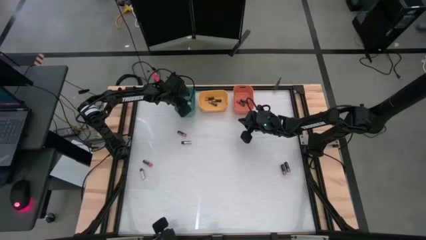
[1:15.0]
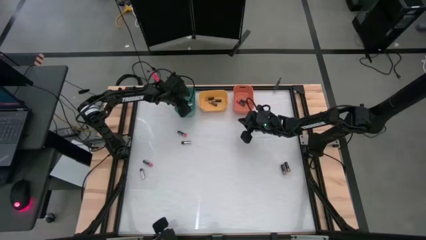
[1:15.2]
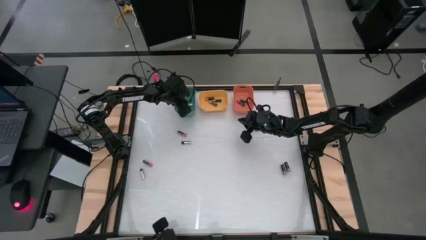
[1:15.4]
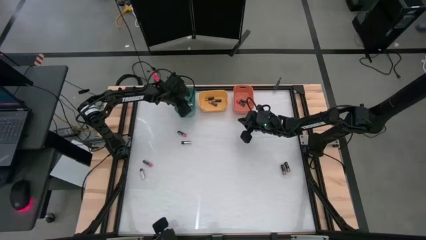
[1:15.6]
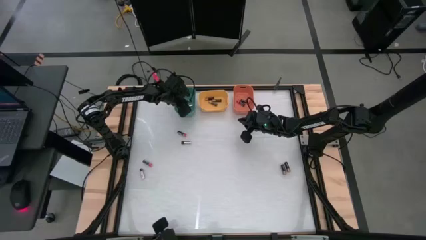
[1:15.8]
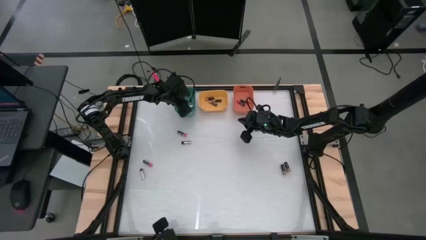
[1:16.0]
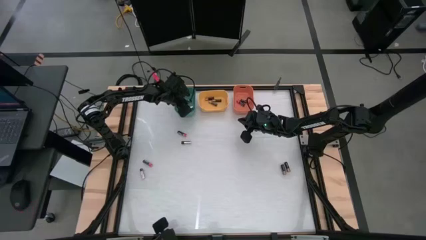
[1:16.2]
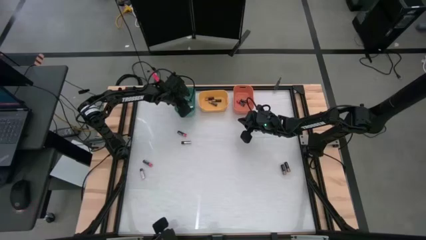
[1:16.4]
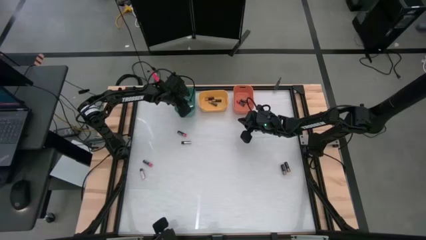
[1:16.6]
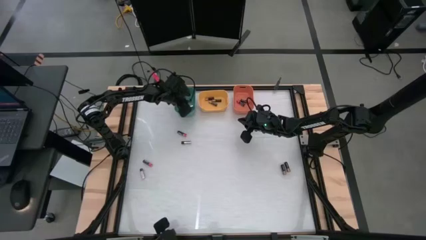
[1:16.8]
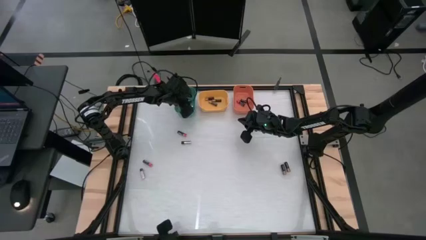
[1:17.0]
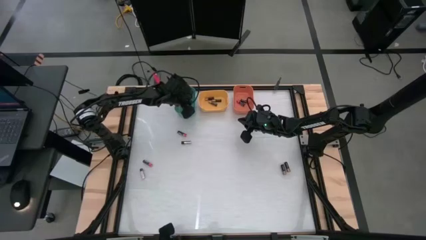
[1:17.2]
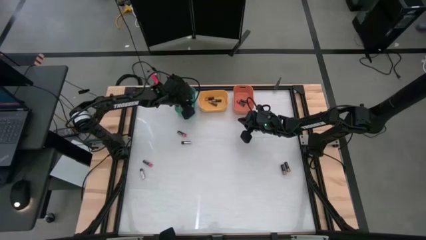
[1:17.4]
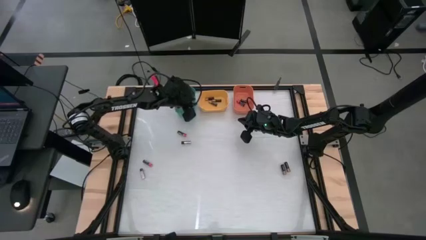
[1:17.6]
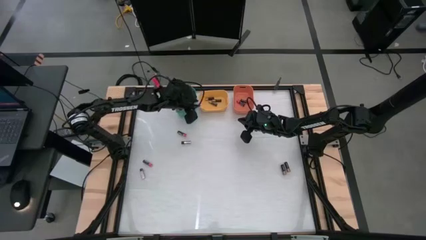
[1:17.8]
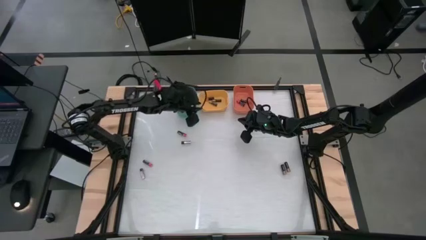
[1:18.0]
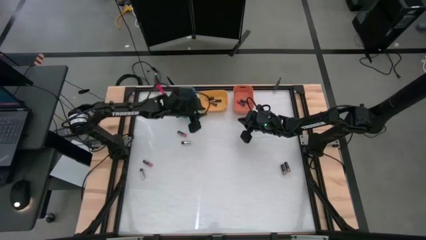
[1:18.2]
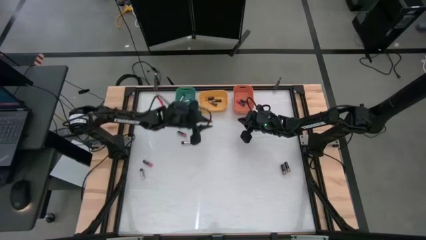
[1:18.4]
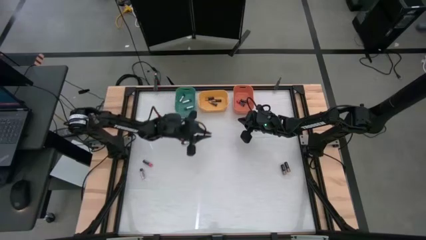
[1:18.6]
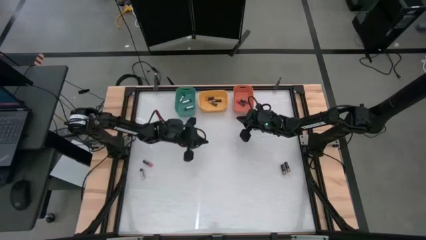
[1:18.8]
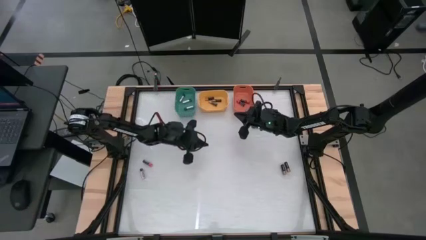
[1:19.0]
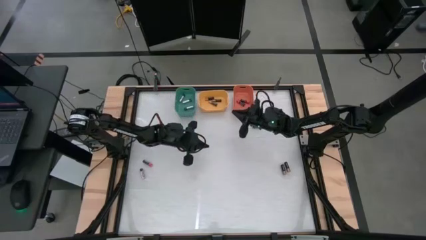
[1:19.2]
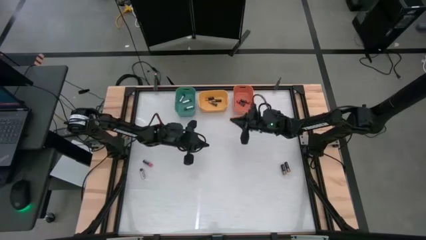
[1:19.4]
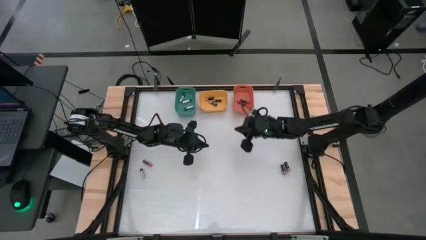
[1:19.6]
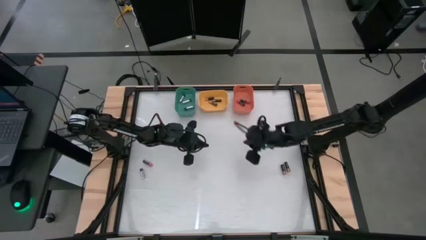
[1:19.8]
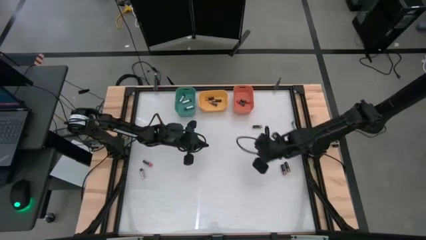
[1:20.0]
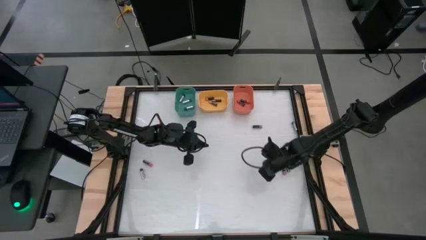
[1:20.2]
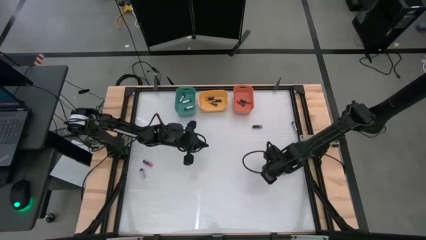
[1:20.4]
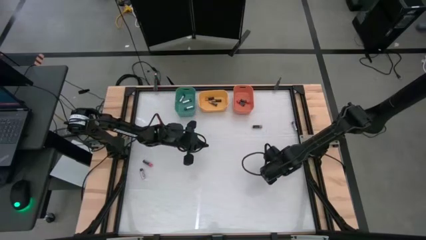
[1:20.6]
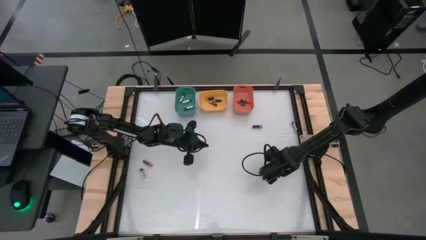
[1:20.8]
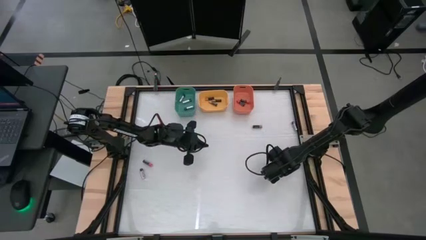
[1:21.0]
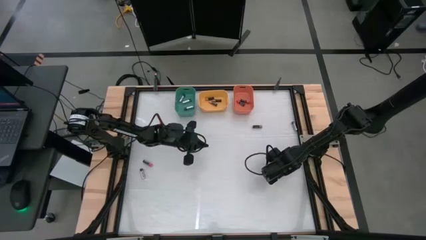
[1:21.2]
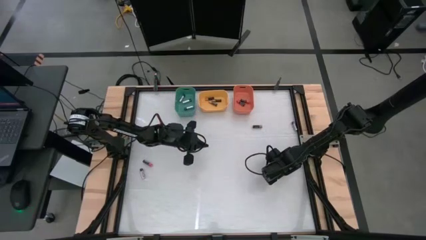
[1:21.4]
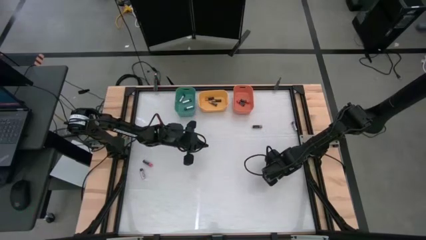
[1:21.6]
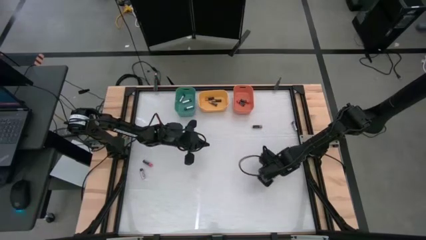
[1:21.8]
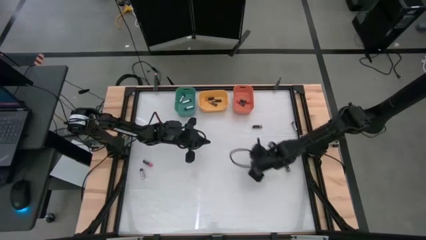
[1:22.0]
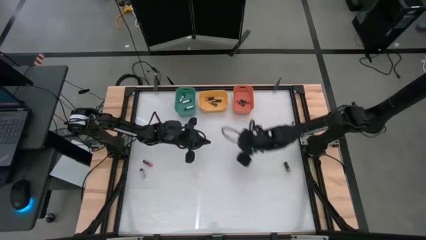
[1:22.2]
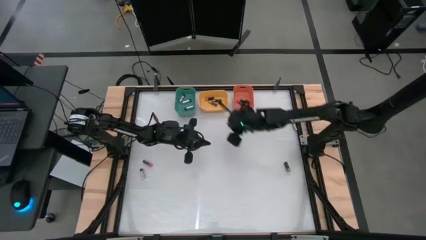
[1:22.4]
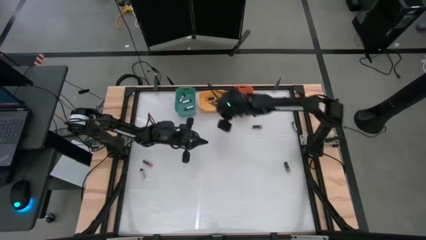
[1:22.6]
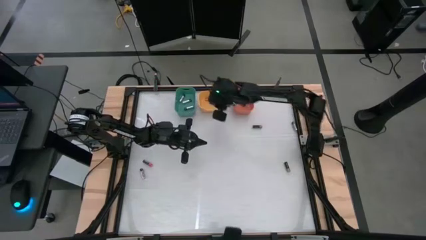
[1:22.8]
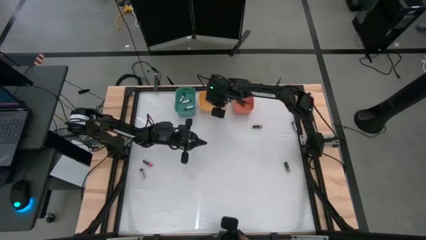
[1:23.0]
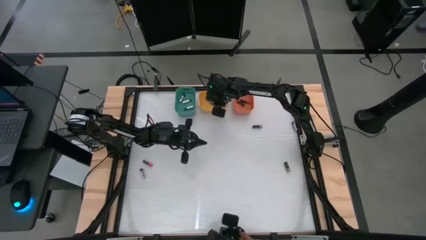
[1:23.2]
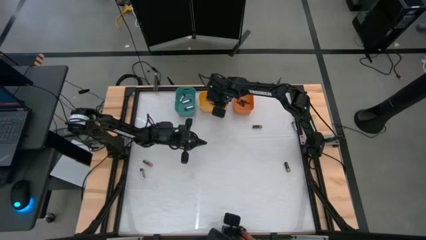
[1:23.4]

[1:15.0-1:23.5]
Task: Sort batteries
Put the brown battery into the yellow bin

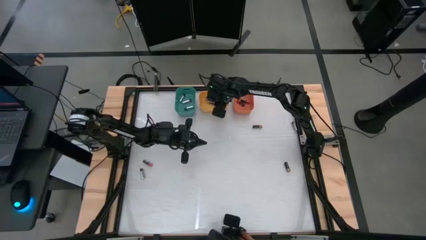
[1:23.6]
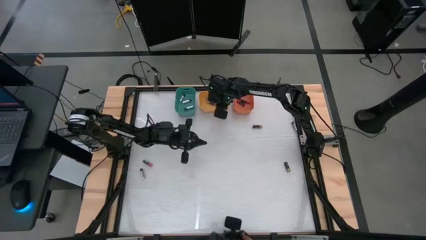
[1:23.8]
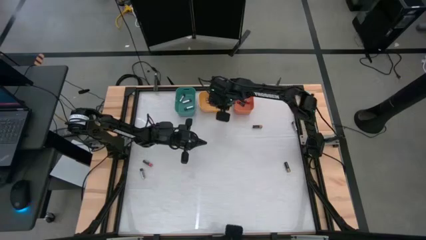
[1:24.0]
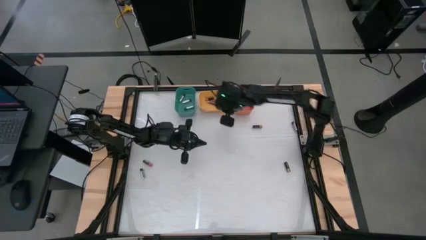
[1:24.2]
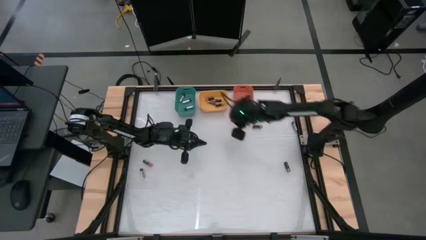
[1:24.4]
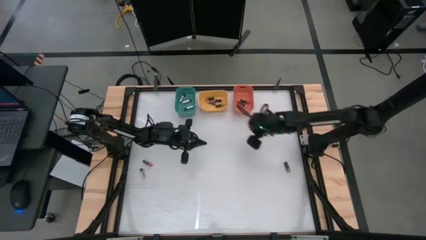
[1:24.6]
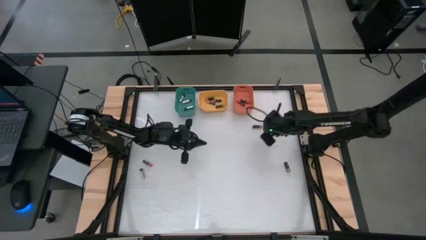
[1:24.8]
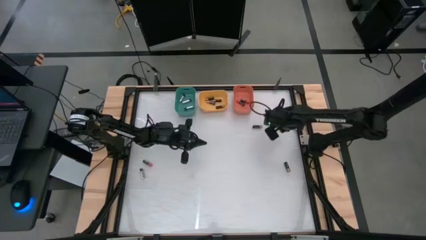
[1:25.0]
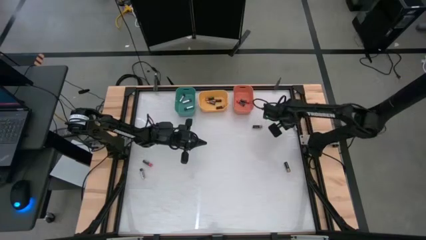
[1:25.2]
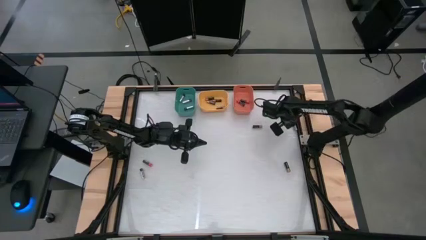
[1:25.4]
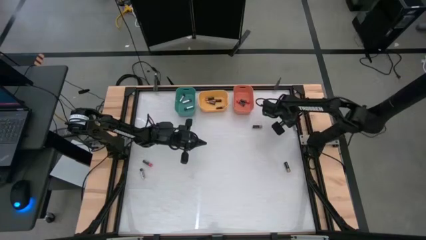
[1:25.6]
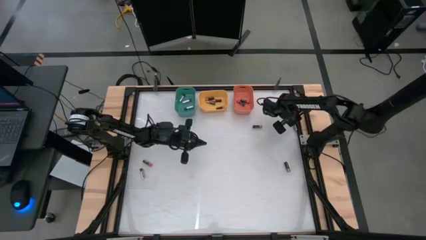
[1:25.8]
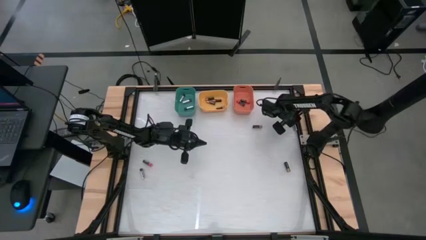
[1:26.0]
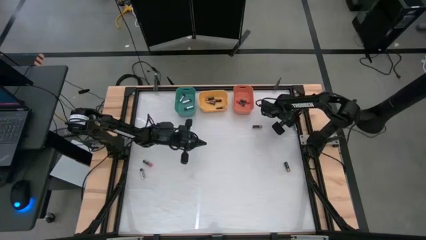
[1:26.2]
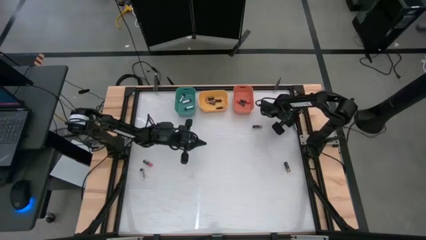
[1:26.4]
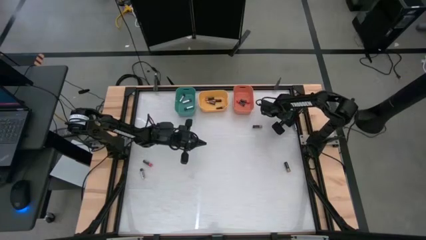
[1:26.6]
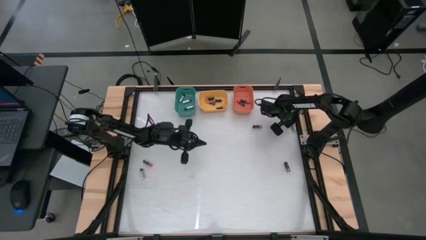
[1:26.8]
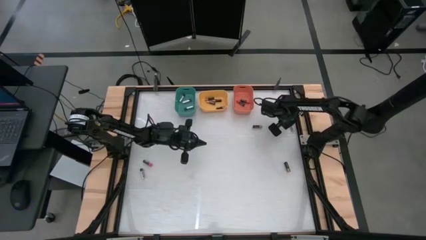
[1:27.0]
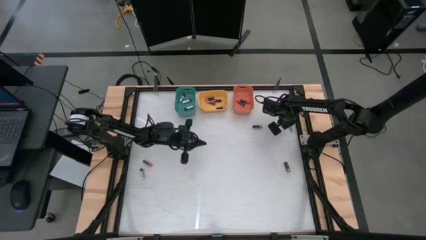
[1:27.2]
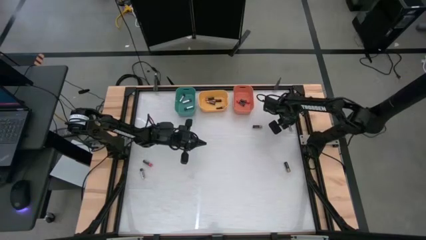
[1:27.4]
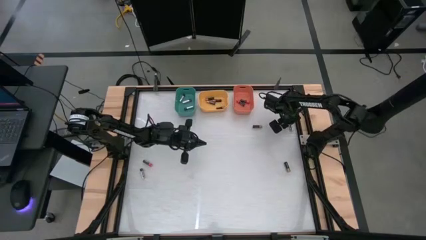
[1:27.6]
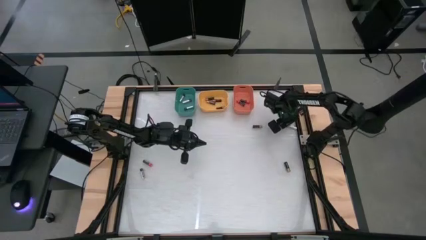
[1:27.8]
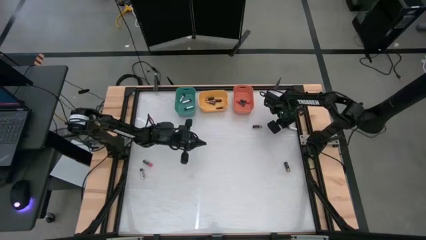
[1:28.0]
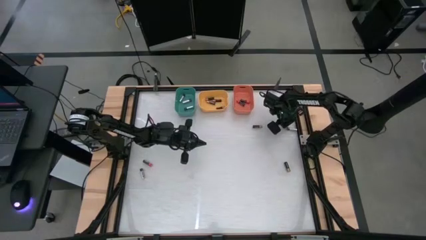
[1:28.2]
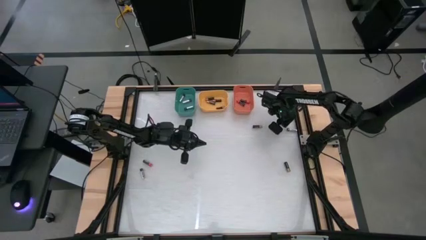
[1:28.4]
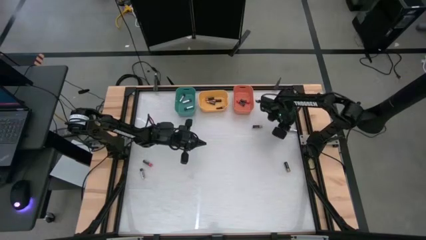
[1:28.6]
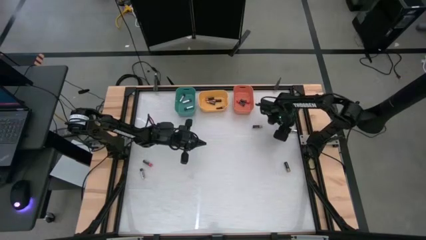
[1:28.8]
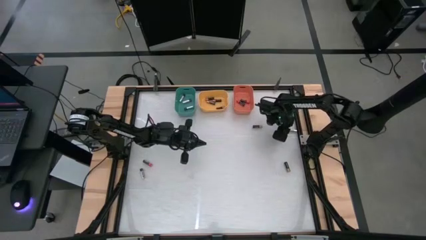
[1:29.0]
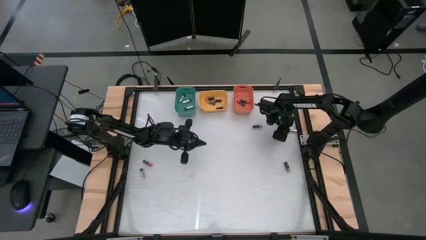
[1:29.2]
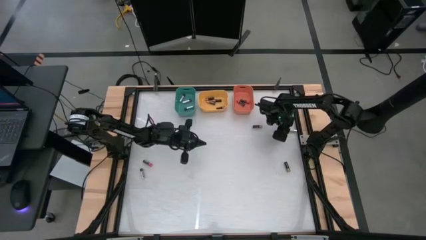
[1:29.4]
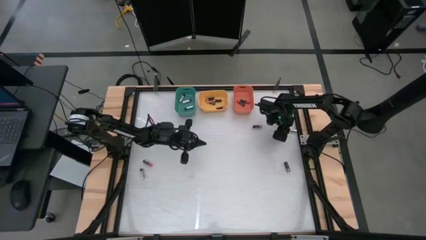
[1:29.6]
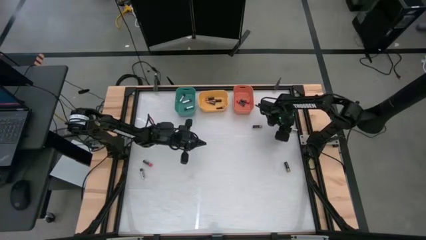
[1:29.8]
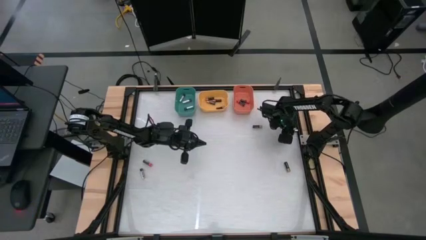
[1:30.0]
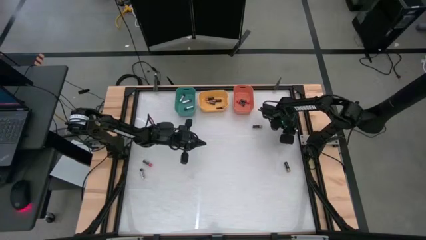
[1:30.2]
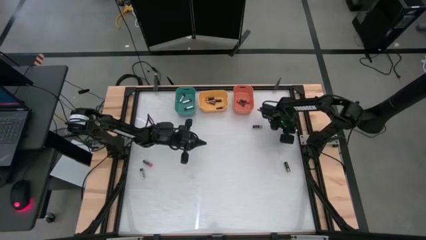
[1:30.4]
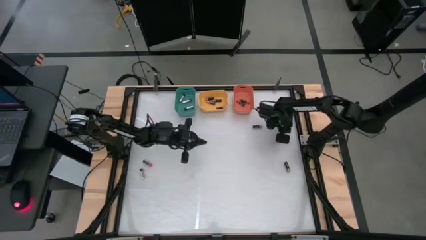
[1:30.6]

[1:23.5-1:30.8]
Put the silver battery into the green bin
